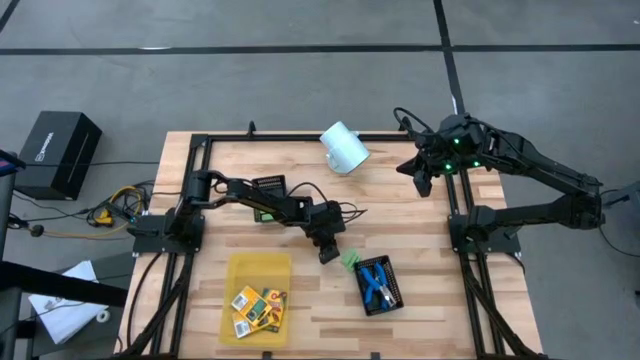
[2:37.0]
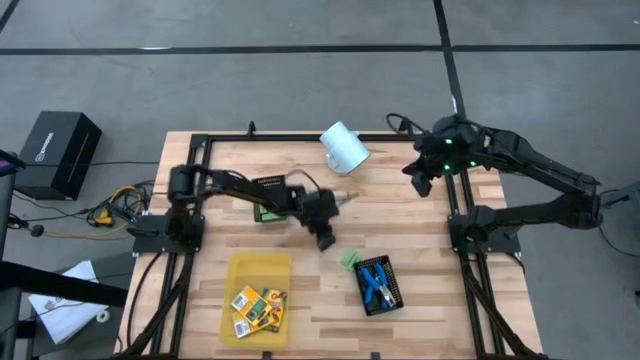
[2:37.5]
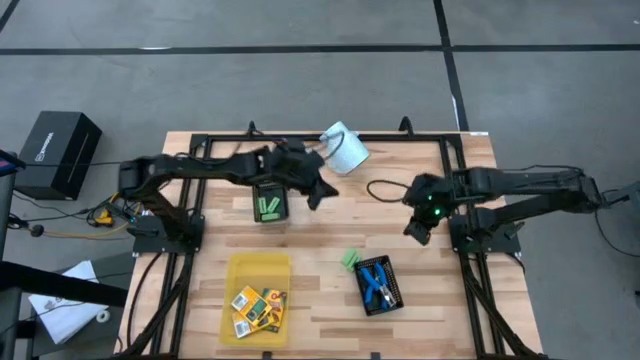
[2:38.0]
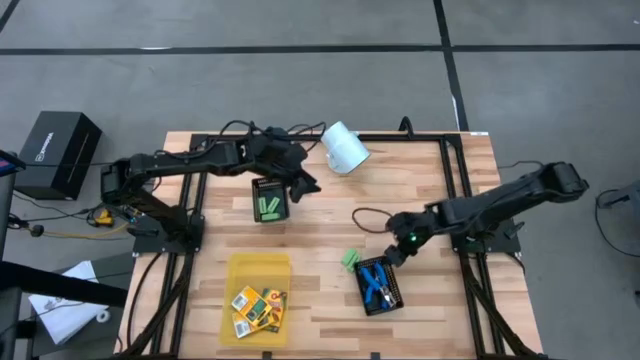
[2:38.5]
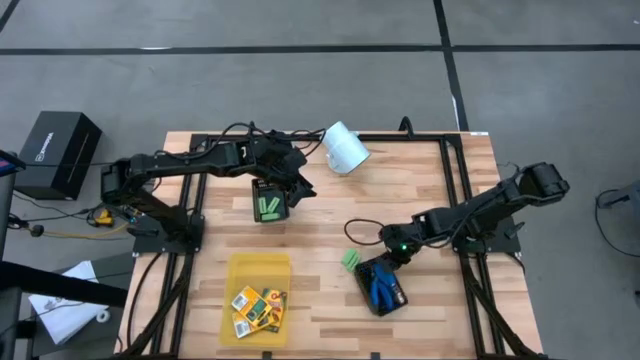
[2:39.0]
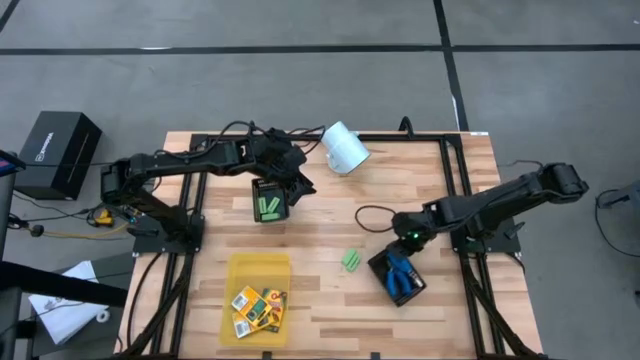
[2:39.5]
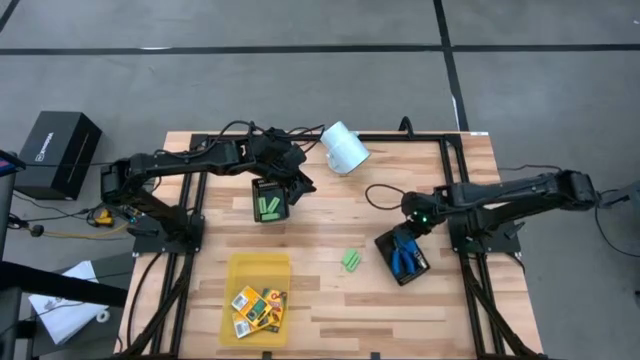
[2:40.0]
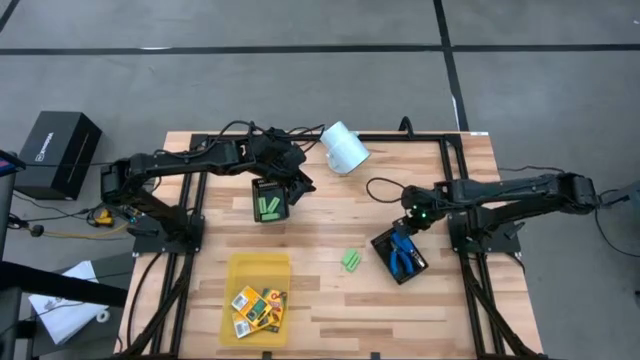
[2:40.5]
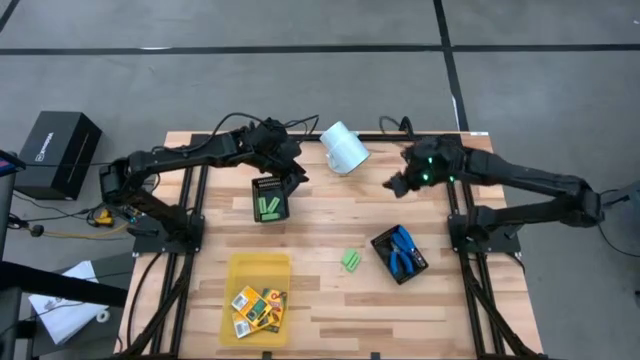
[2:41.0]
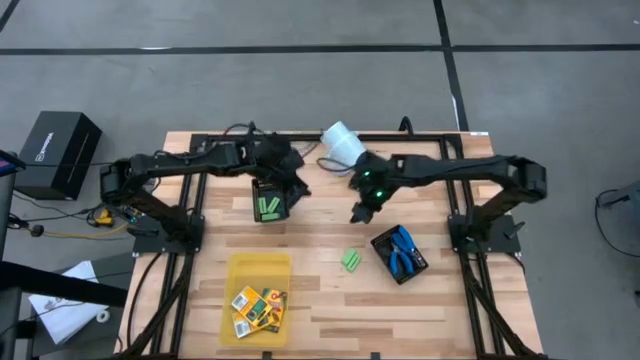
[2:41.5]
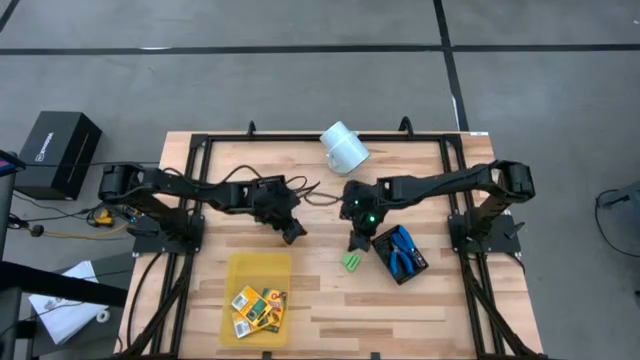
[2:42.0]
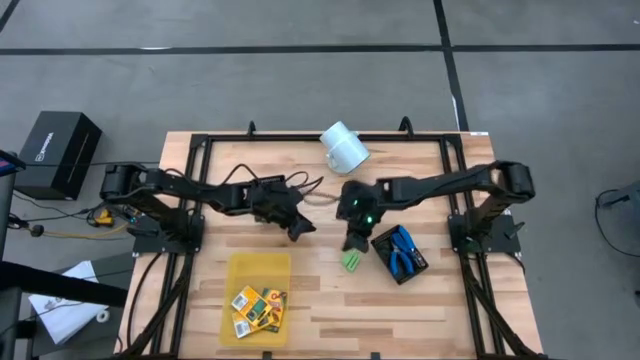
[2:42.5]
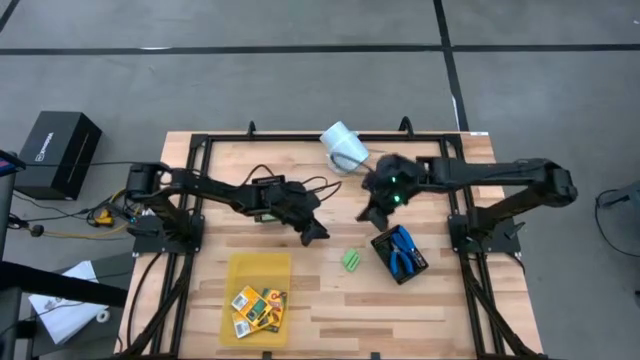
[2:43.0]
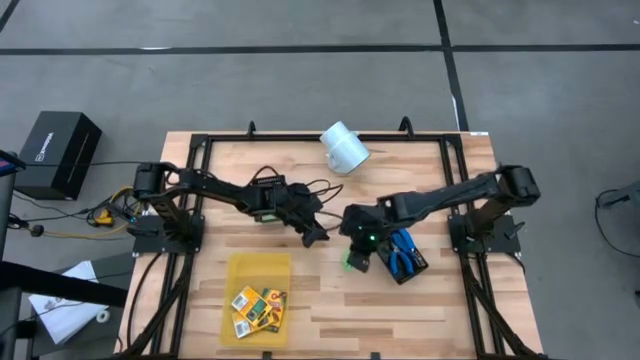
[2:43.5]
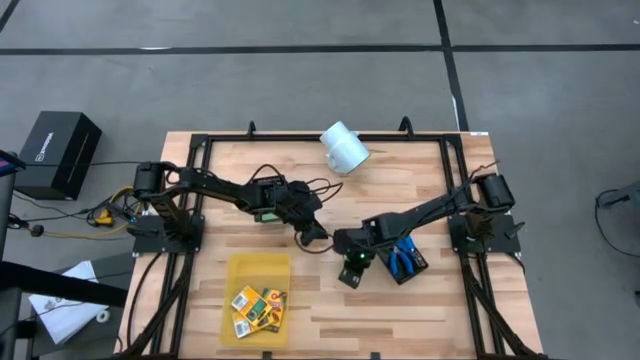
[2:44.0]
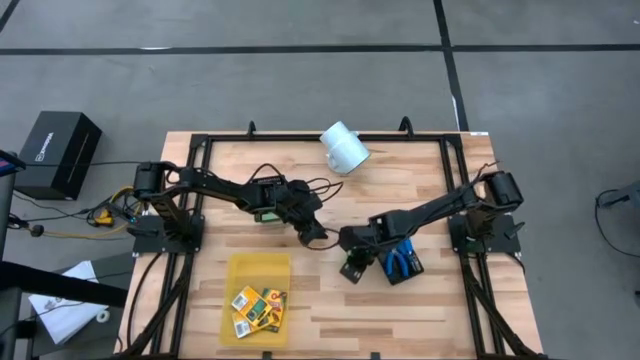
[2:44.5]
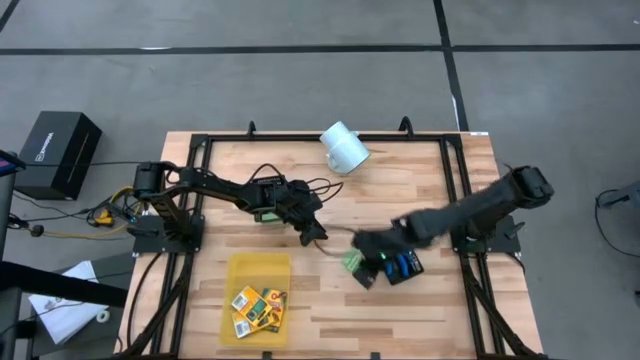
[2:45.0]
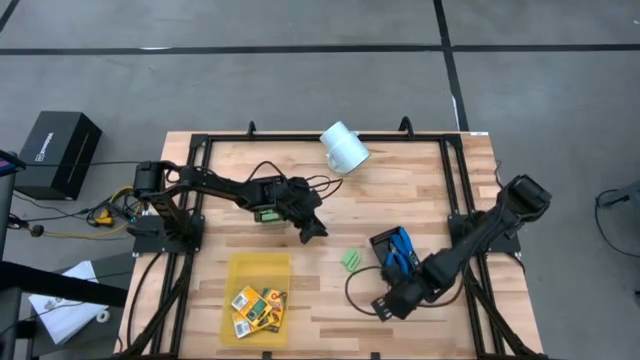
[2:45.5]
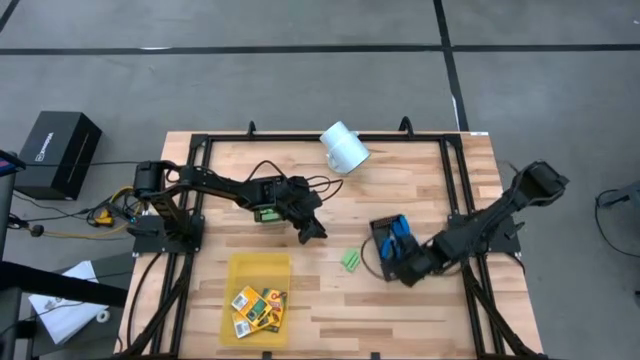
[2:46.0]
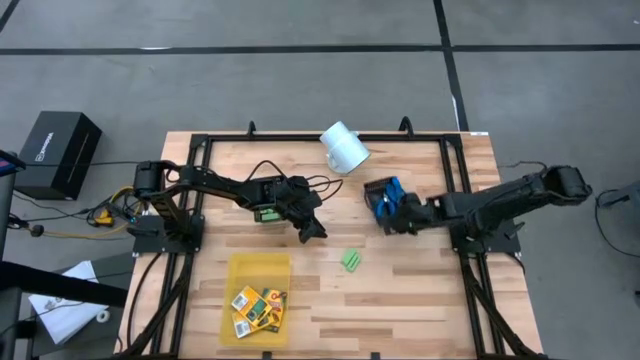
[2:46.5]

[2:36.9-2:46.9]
Task: Pick & Place School Supplies
Move the bottom black bin to the top right of the table

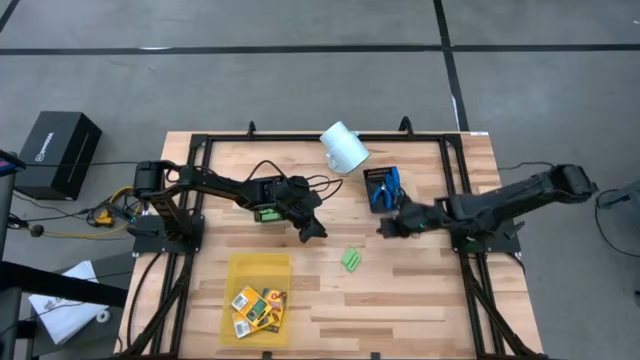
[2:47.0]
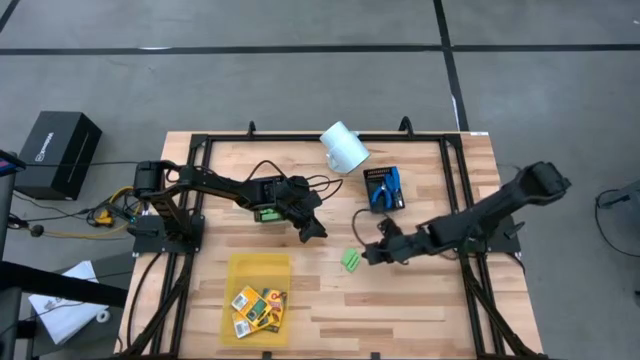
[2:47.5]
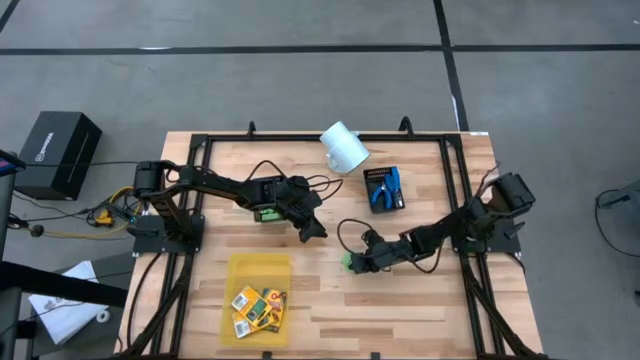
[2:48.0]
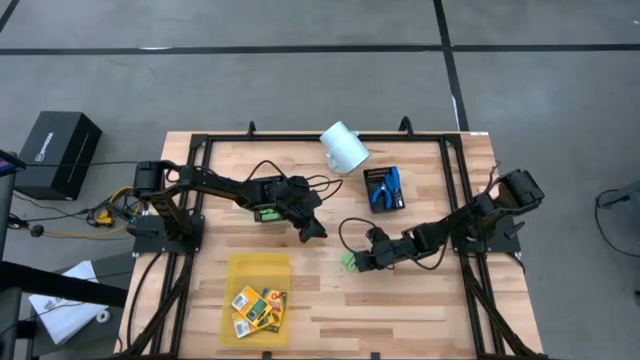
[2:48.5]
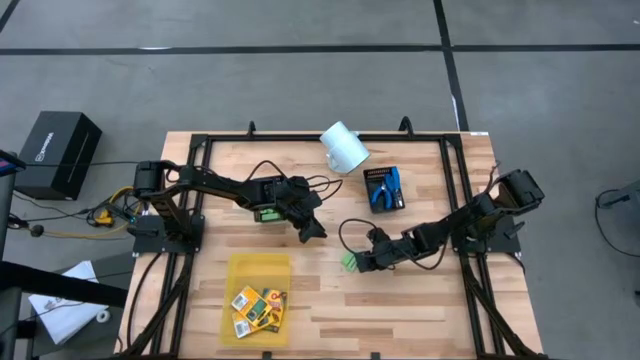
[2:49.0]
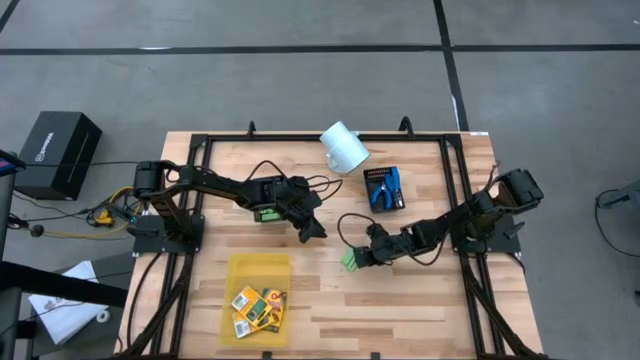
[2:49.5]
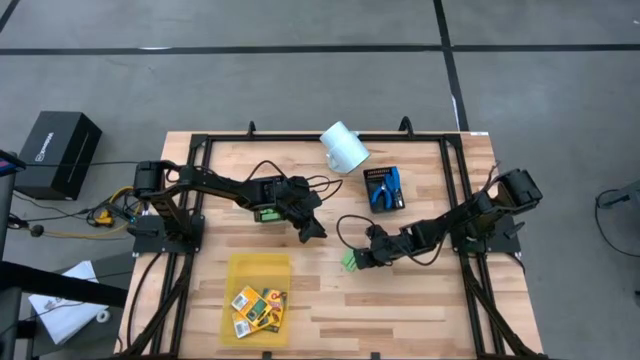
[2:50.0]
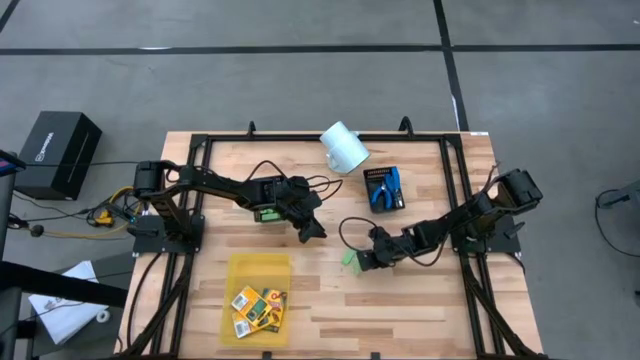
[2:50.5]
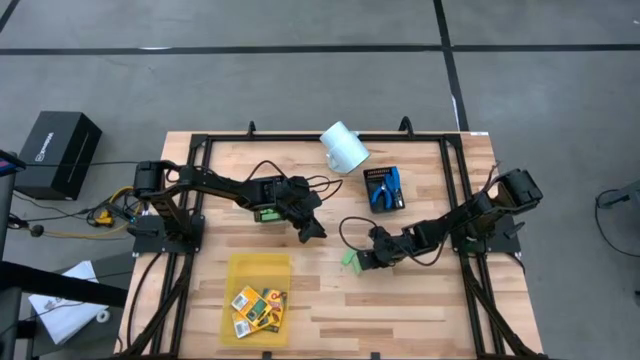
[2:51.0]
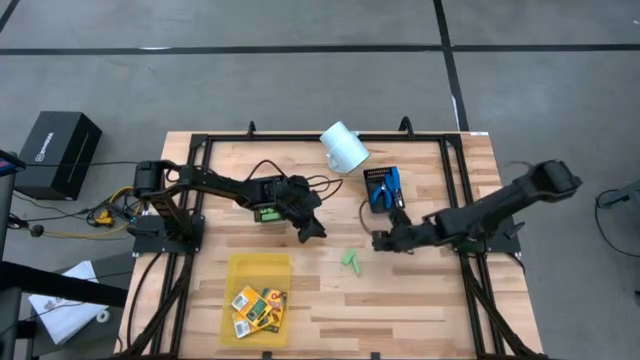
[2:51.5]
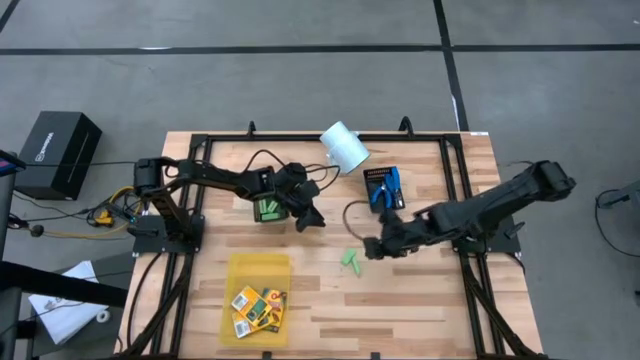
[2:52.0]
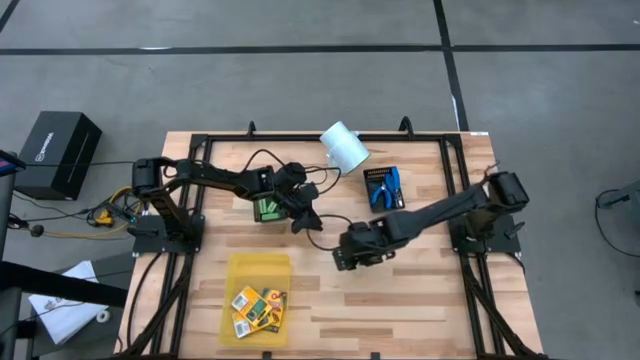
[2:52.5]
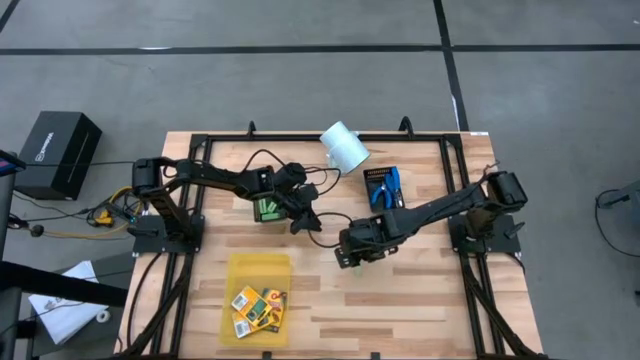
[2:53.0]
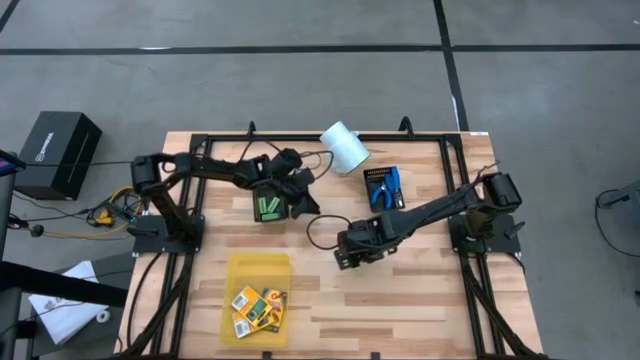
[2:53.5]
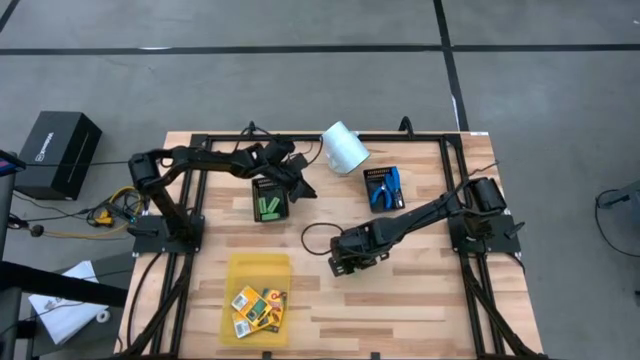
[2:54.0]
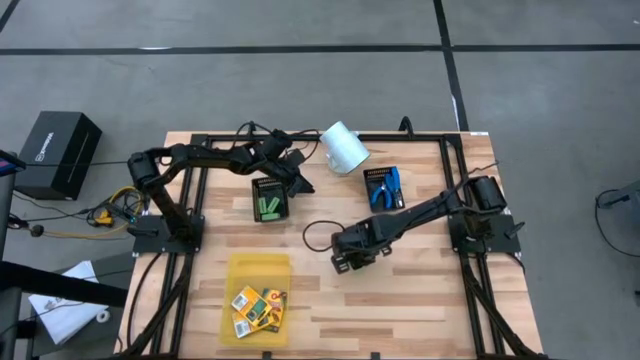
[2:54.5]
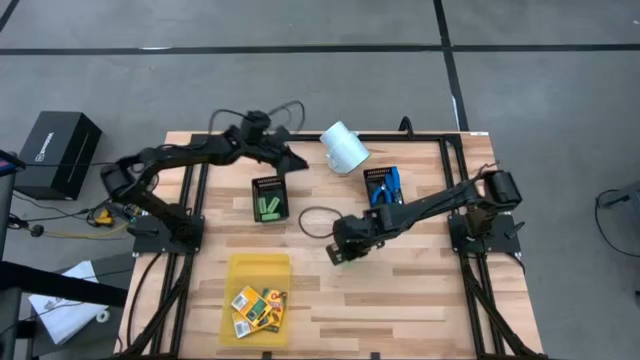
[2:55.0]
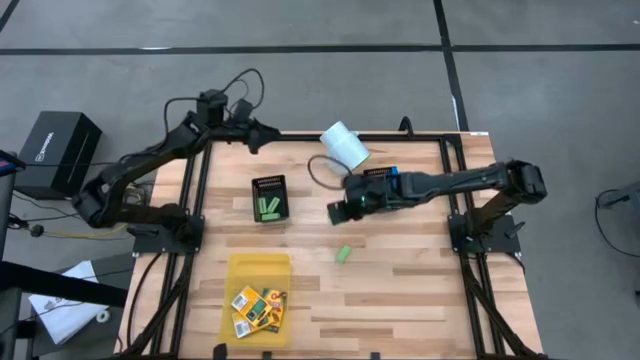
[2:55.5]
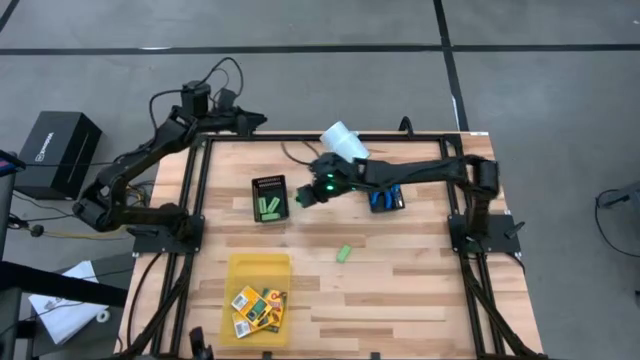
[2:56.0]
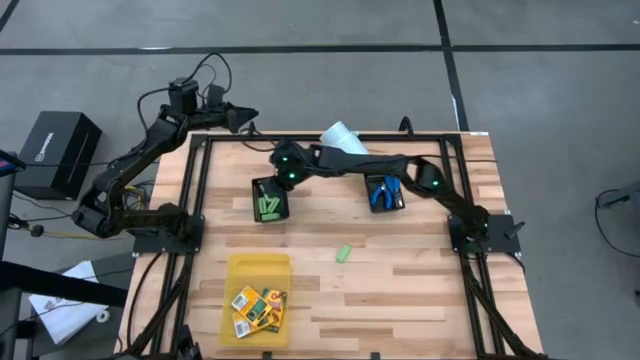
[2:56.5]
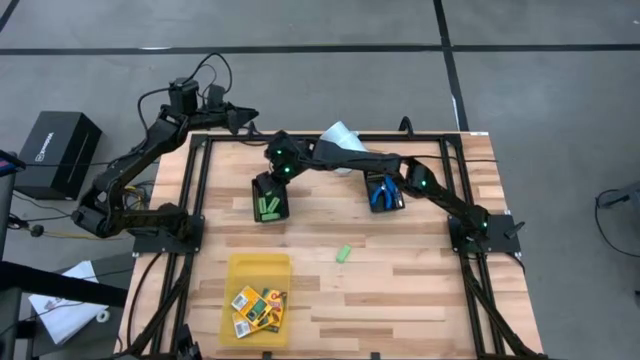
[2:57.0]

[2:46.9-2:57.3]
Put the green eraser into the left black bin

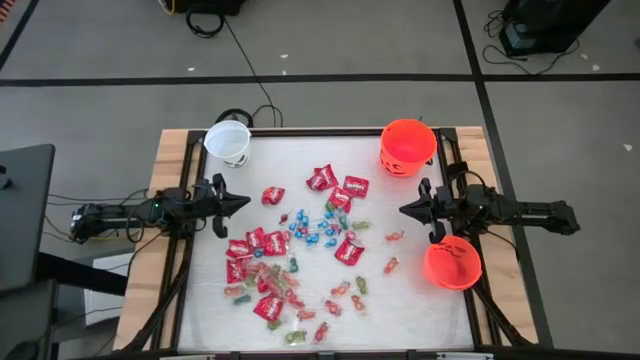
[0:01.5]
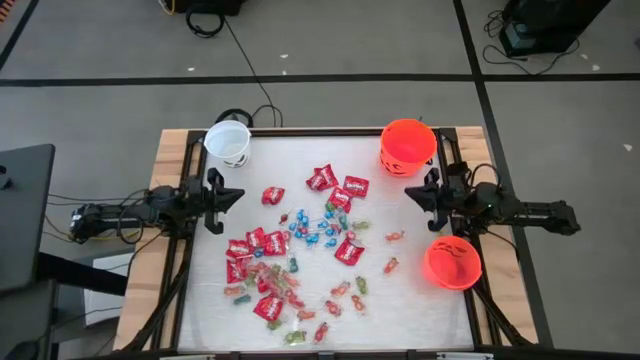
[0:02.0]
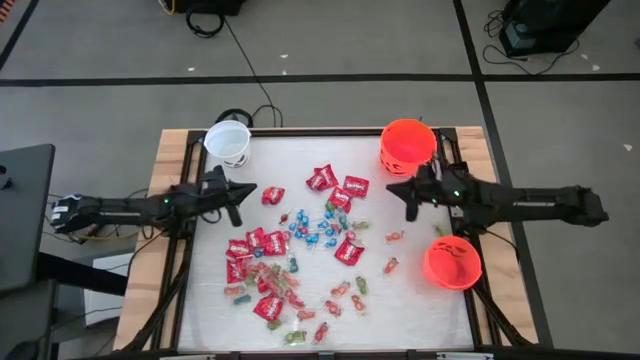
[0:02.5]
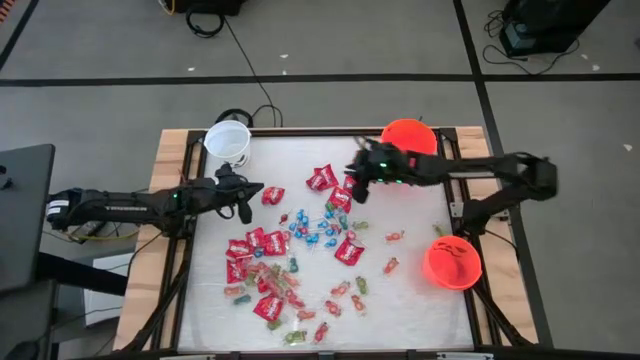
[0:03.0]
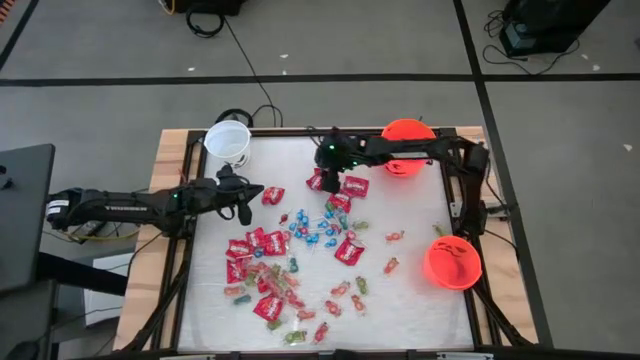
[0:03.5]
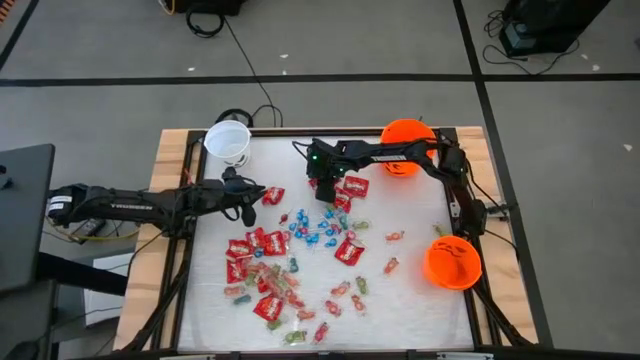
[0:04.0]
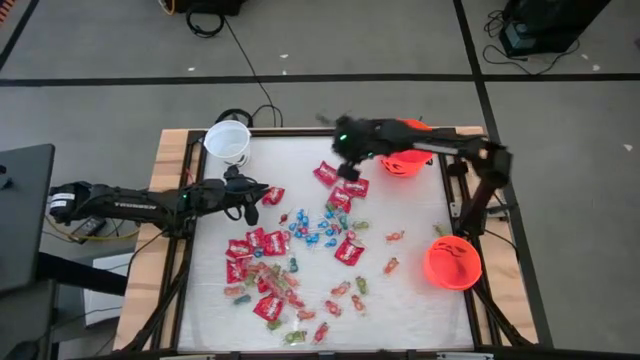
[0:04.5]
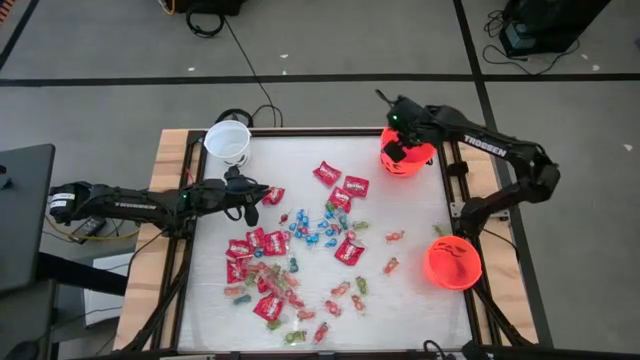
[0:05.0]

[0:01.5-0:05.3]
Task: Sort candy by brand, put in halloween buckets
Put the red candy into the top orange bucket
